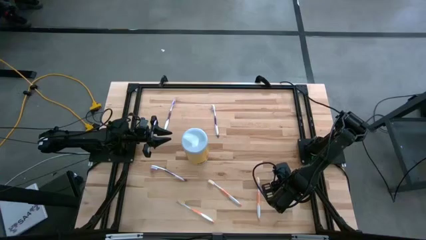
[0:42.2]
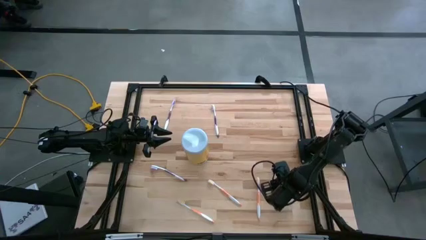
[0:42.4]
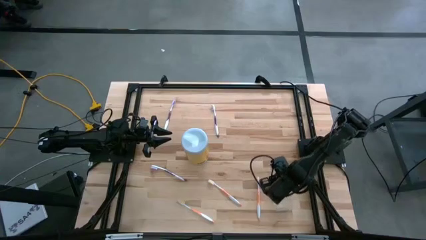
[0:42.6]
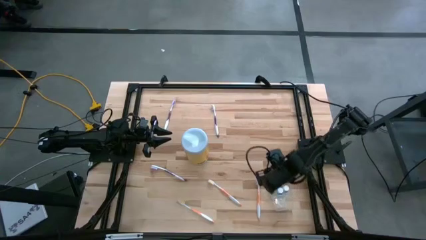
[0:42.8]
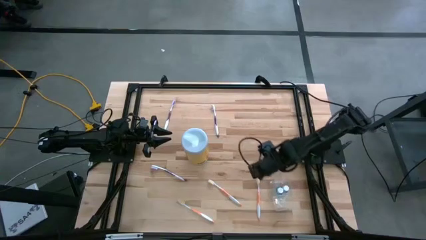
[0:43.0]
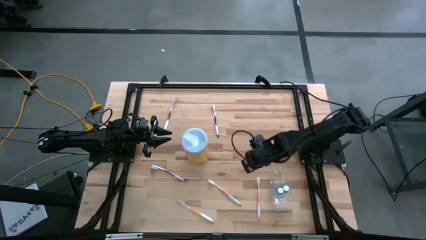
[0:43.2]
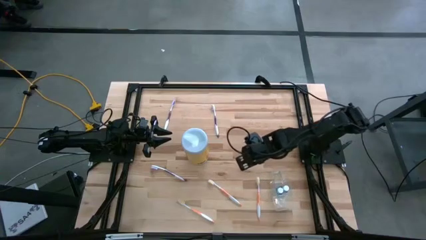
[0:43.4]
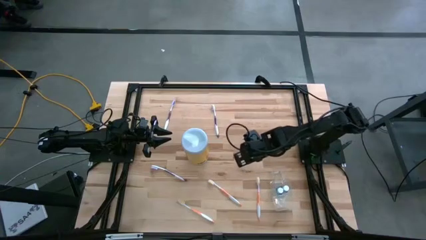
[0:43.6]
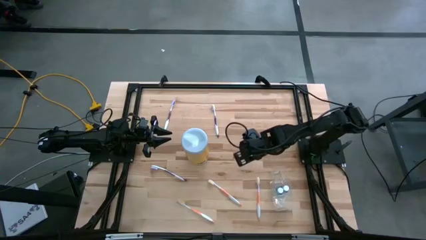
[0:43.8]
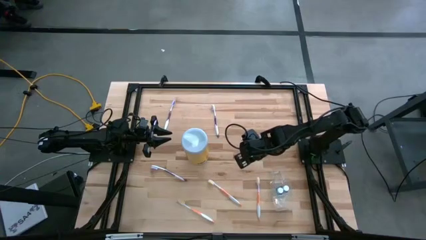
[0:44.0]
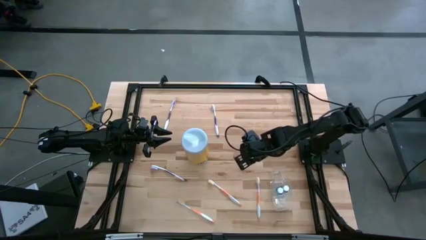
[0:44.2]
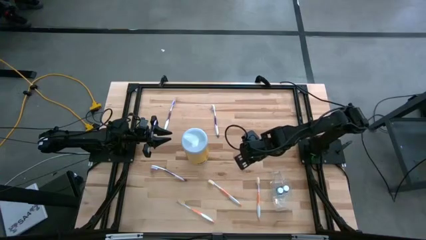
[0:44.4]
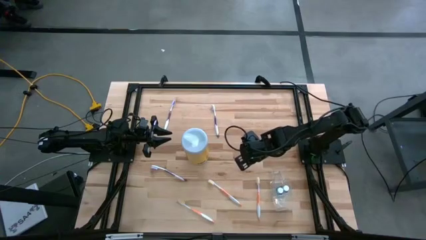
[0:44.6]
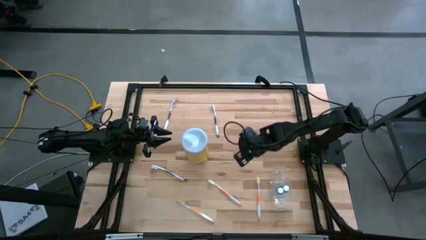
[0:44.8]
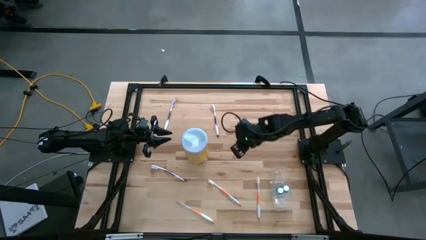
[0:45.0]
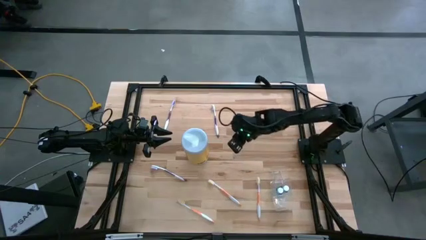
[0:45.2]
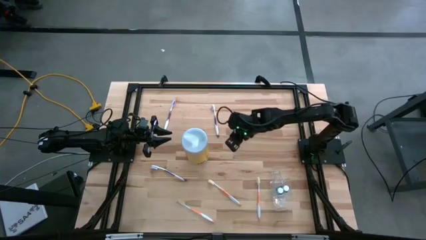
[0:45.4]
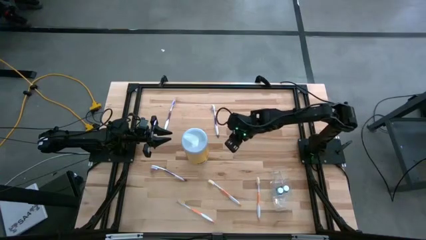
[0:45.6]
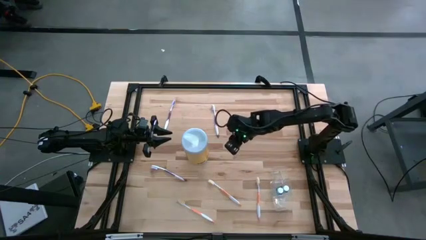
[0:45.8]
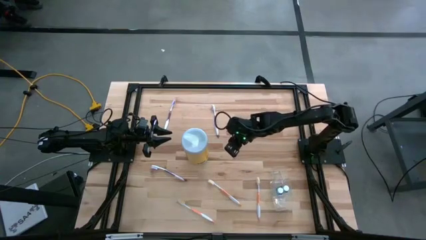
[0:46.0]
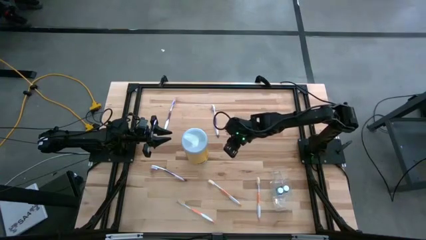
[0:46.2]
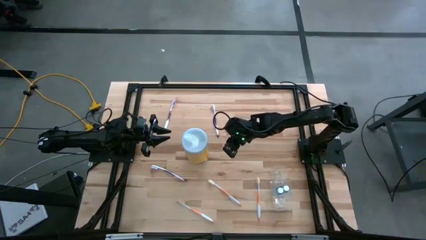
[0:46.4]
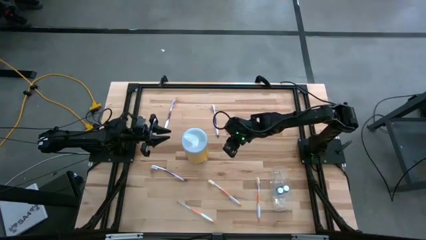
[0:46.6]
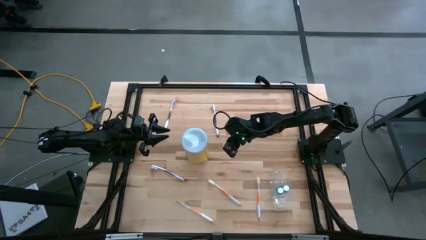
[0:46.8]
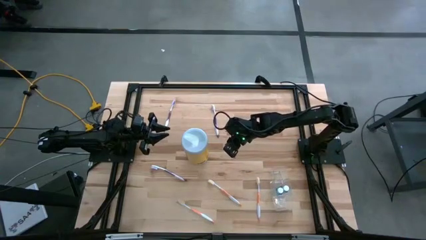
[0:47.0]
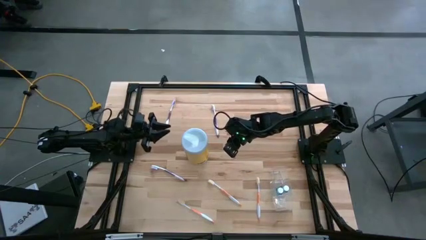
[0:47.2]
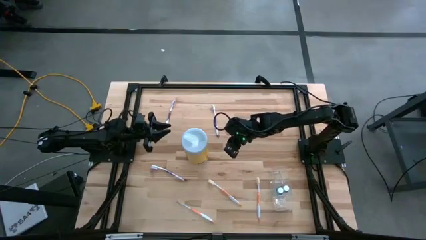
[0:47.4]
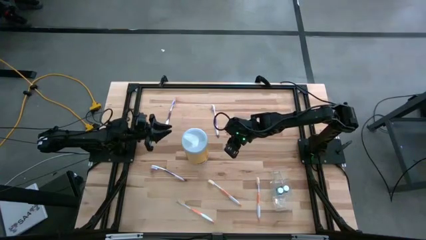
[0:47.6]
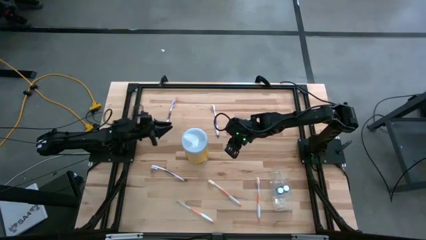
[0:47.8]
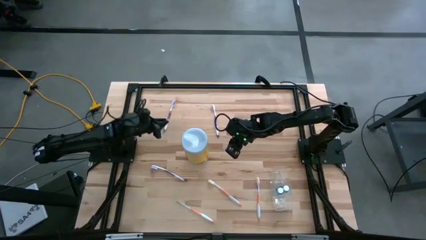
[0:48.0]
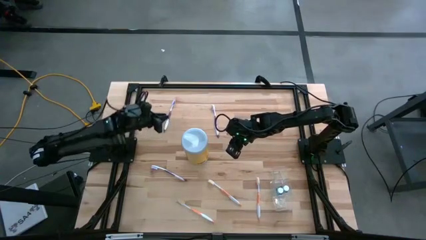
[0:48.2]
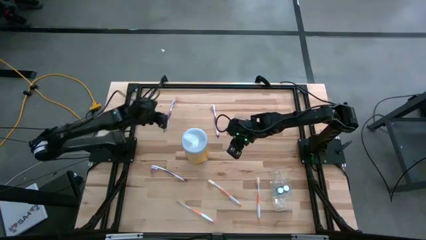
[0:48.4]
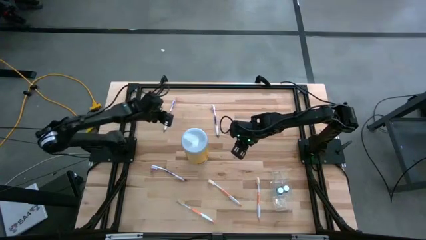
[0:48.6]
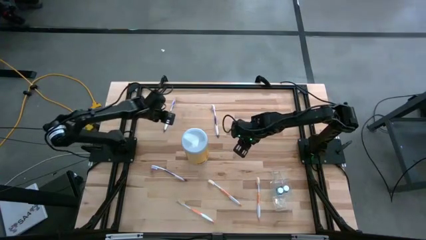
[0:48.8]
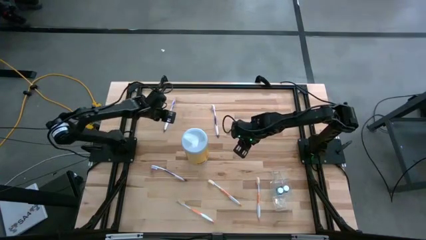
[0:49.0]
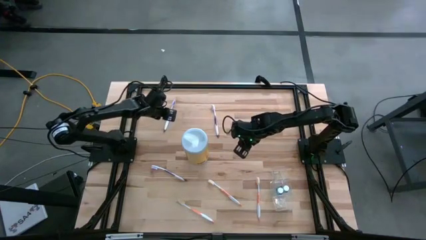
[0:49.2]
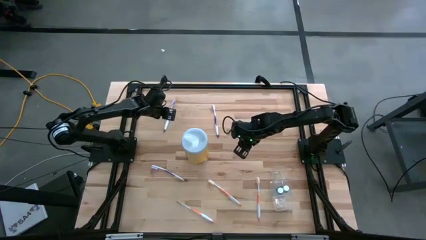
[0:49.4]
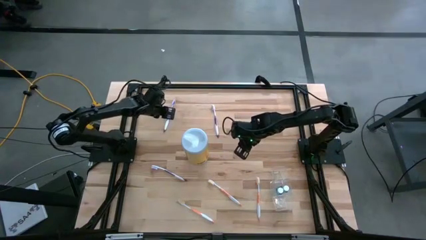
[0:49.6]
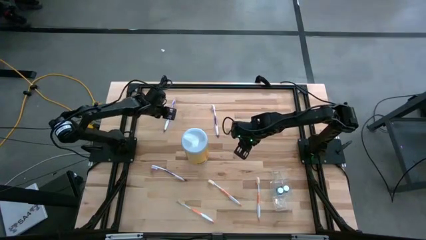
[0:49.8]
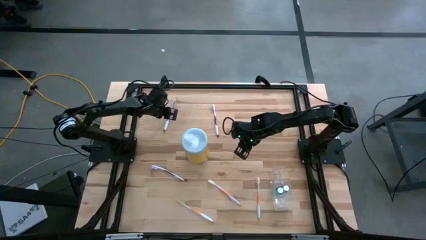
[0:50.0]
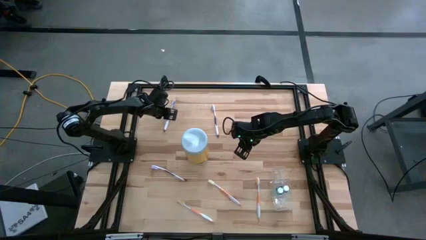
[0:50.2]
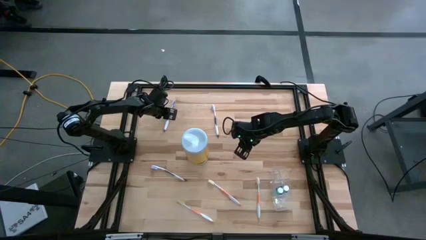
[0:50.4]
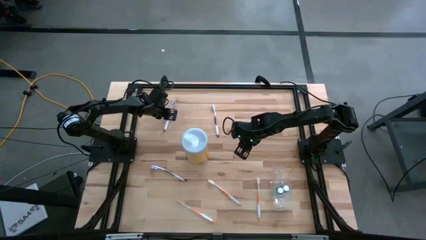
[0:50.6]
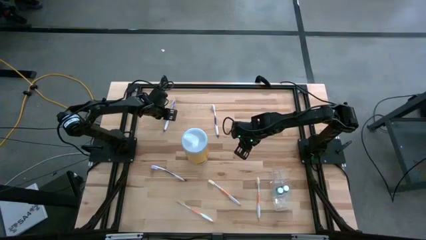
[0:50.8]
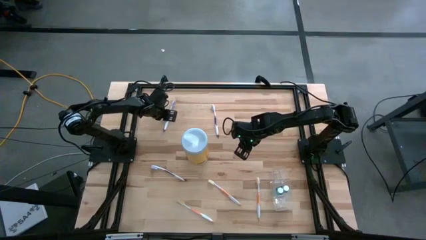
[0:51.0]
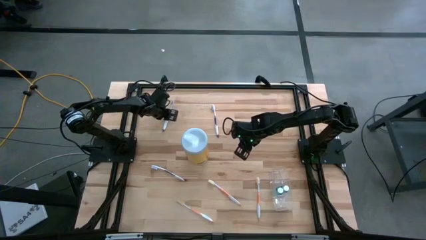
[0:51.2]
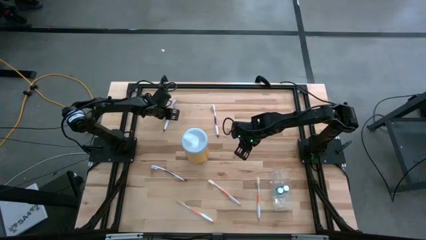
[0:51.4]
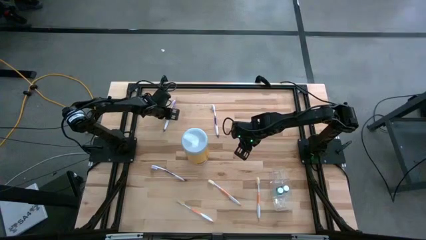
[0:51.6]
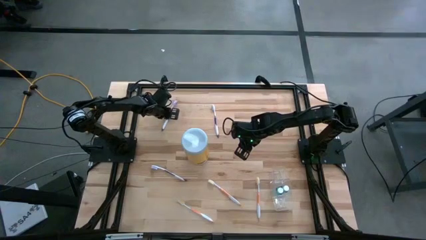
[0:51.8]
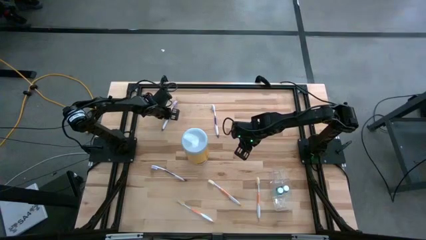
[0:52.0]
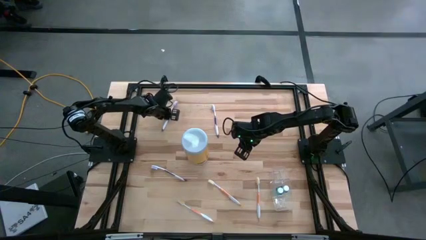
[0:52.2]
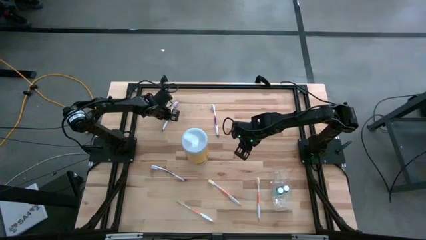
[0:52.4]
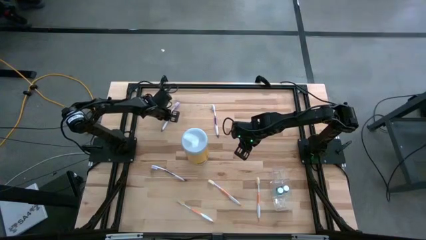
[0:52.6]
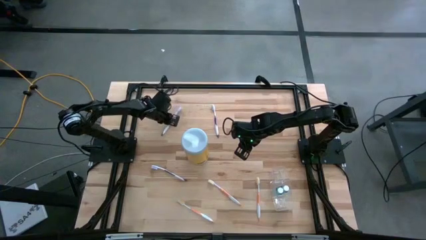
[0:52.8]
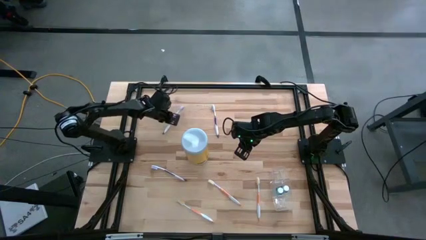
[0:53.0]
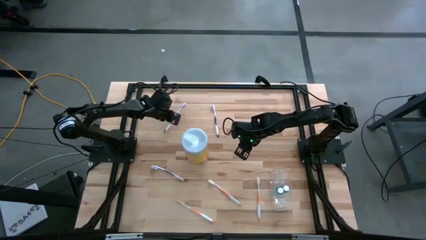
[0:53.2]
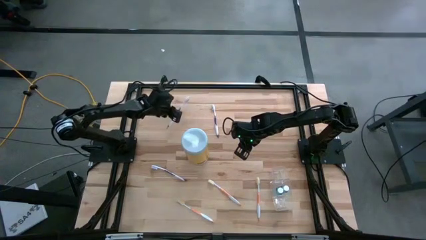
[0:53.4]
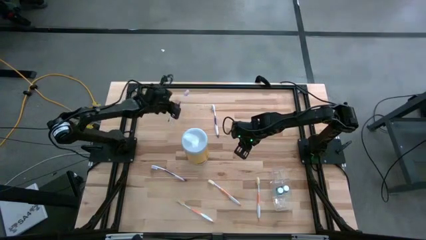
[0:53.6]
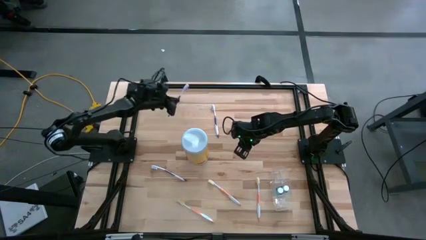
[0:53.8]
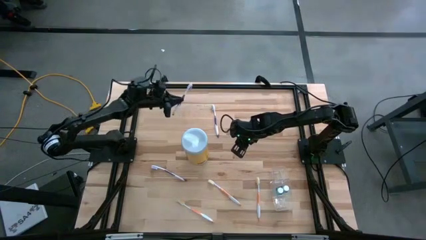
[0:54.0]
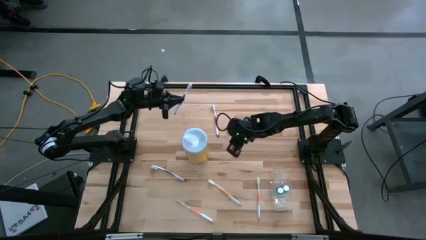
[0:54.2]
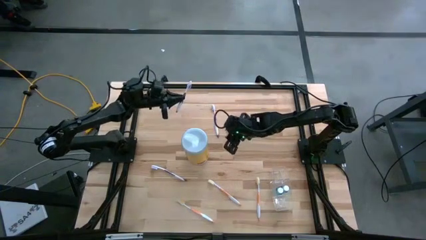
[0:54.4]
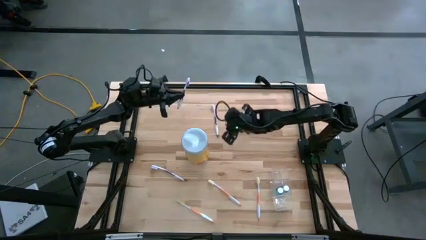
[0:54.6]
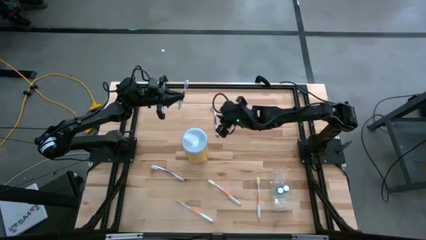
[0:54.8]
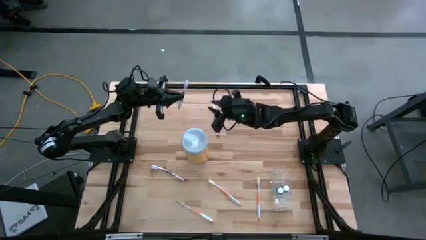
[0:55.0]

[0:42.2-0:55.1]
Task: Pick & Place toothbrushing station
Put the top left purple toothbrush in the bottom section of the transparent organizer

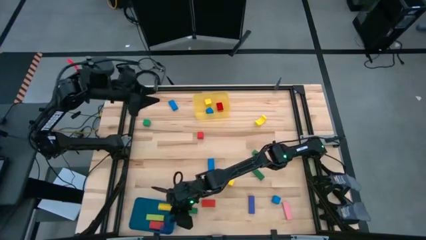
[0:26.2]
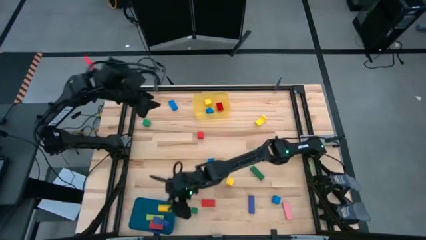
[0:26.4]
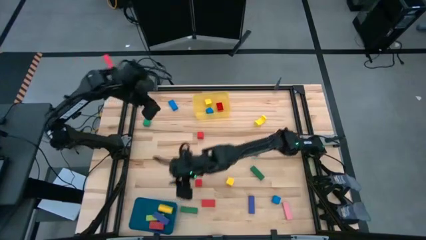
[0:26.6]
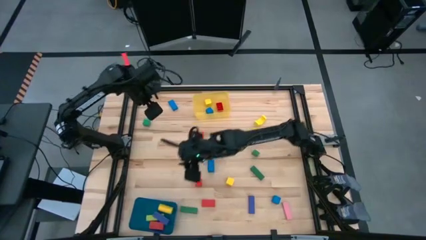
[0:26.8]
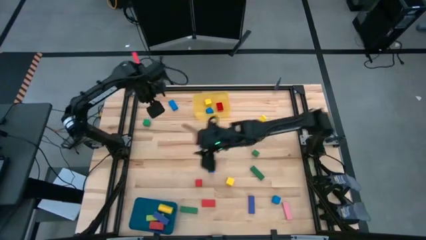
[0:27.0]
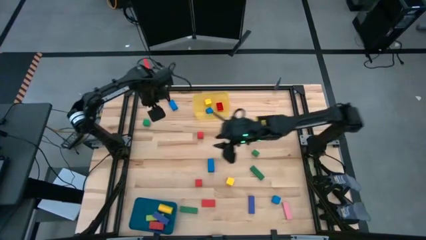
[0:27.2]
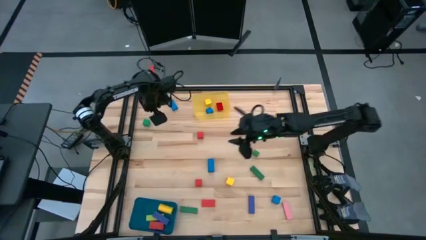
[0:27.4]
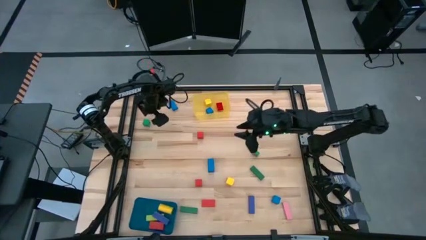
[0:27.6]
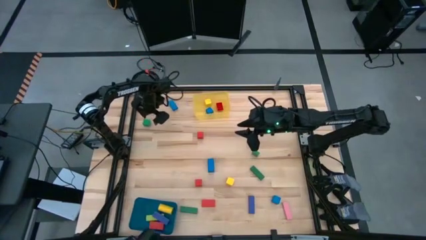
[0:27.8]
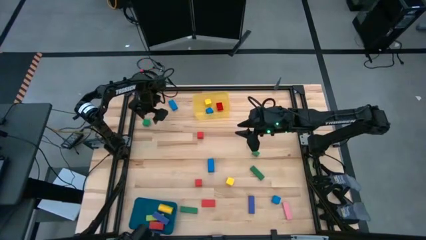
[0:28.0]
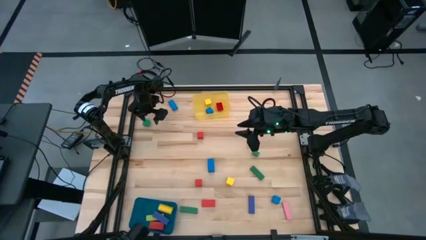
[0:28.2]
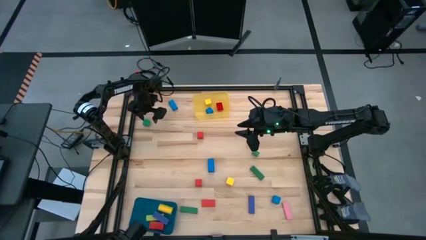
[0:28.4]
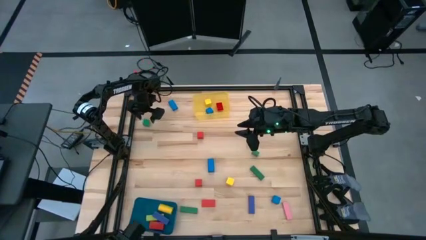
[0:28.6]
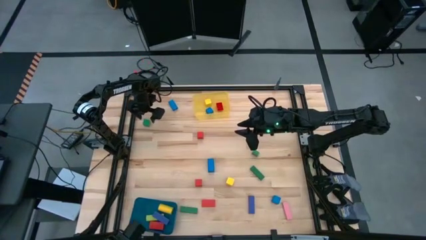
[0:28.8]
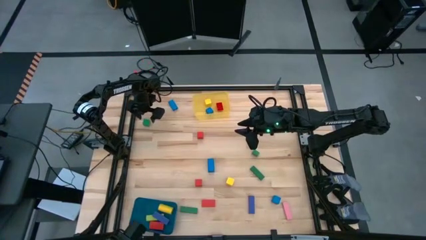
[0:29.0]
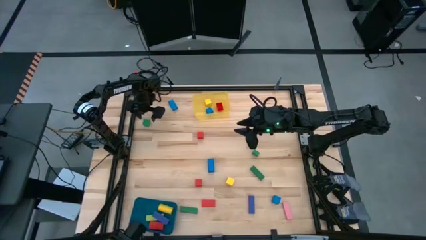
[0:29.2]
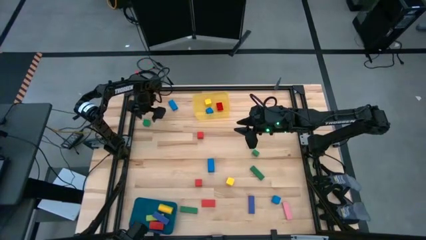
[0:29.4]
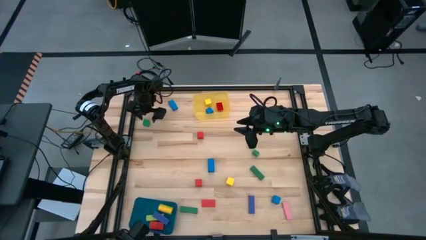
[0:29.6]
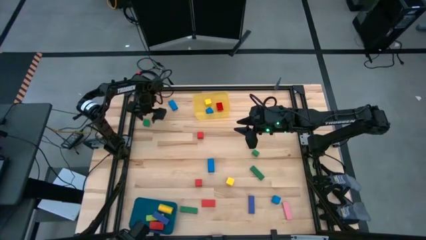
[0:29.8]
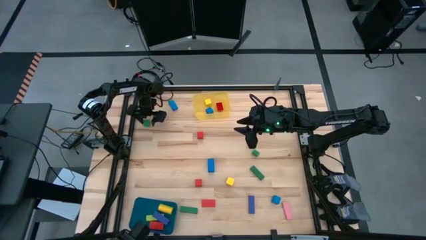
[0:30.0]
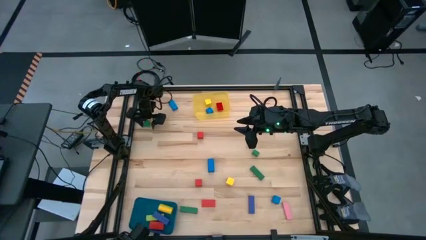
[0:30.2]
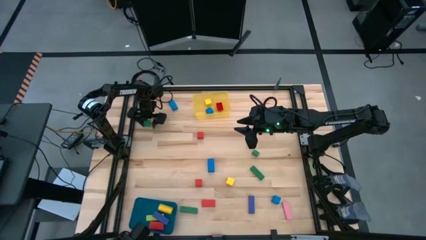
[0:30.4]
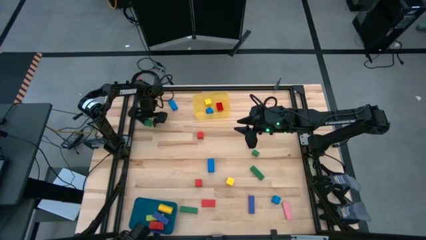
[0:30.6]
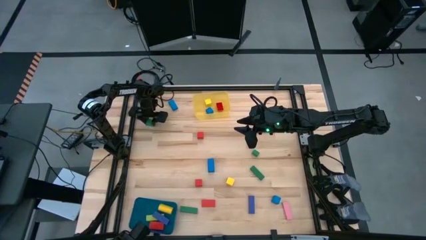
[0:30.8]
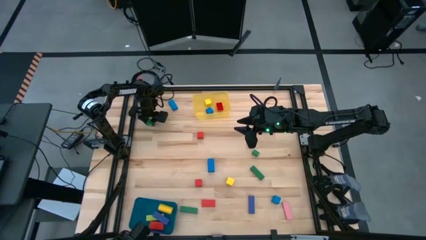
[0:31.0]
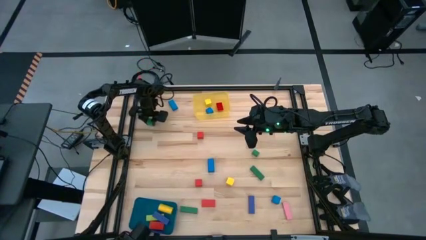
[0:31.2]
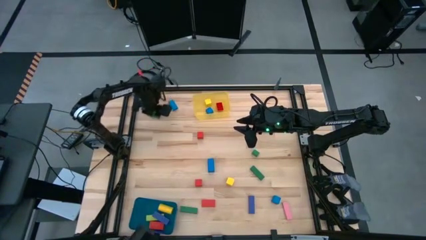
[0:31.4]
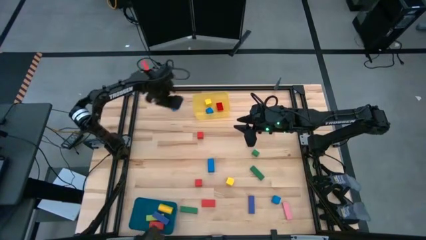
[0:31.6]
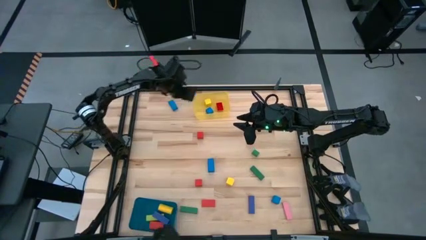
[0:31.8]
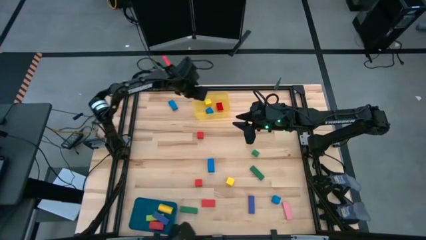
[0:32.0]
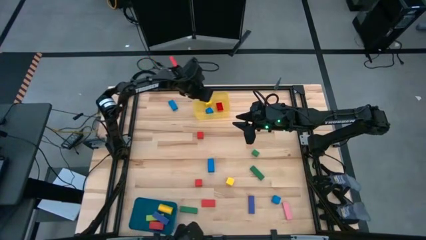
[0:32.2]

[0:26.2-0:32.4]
Task: Sort blocks by size
Put the green square block into the yellow bin
